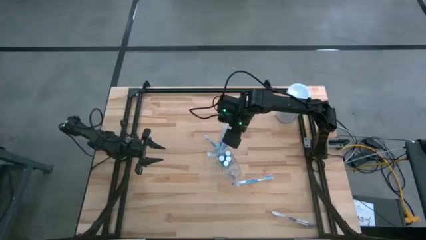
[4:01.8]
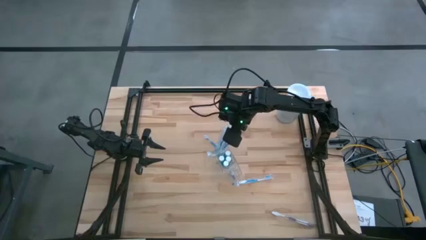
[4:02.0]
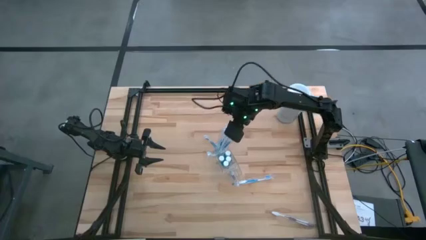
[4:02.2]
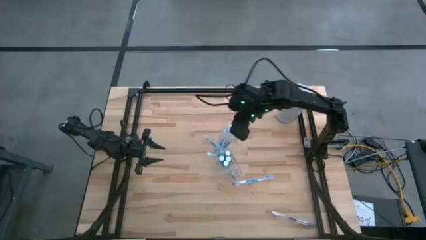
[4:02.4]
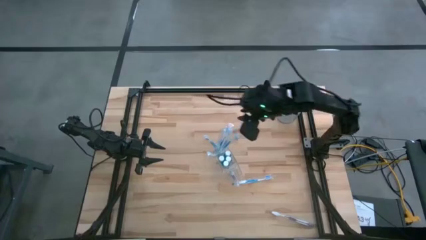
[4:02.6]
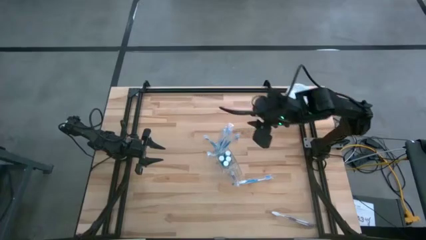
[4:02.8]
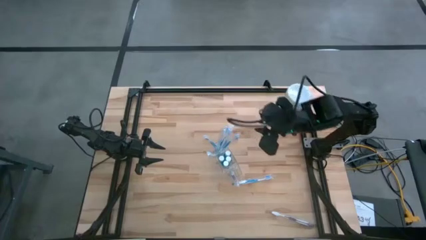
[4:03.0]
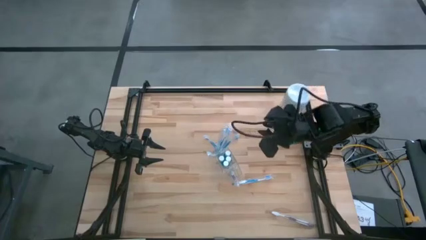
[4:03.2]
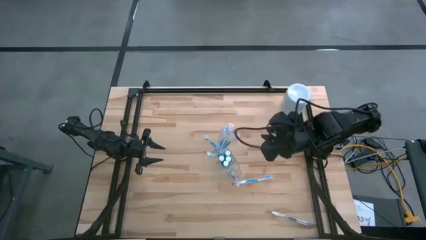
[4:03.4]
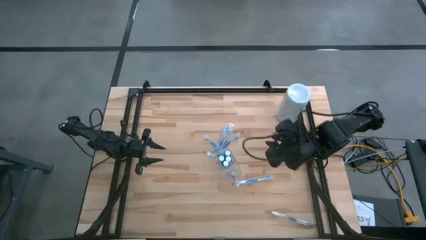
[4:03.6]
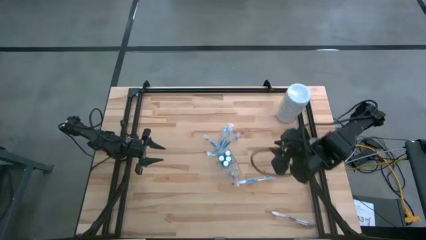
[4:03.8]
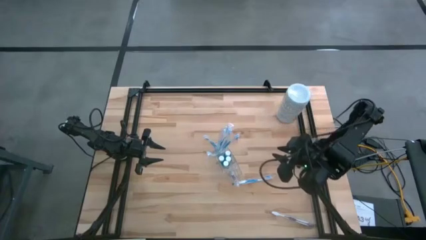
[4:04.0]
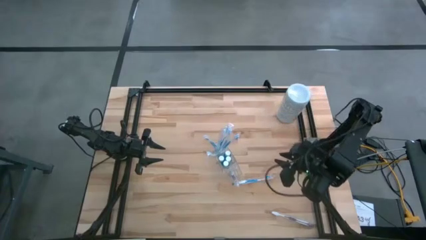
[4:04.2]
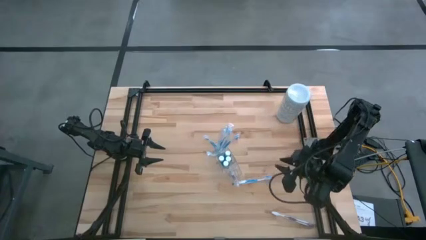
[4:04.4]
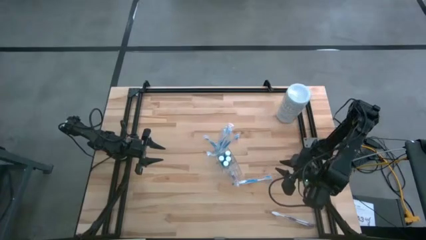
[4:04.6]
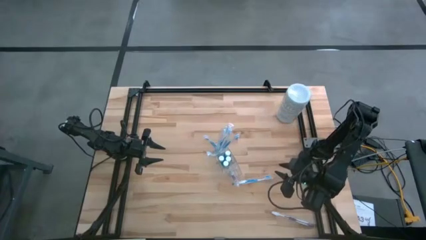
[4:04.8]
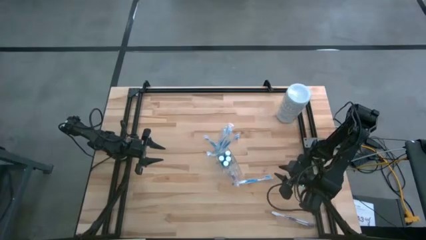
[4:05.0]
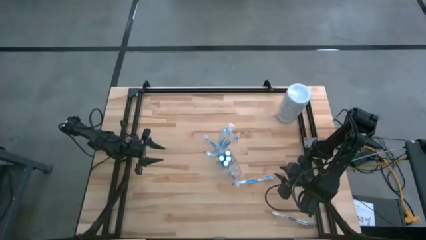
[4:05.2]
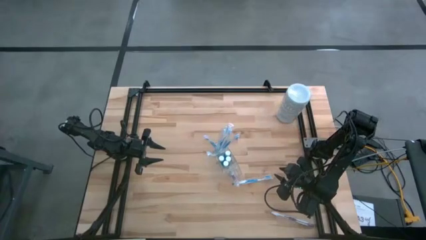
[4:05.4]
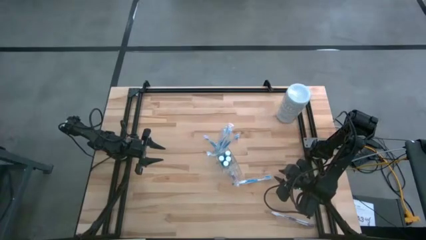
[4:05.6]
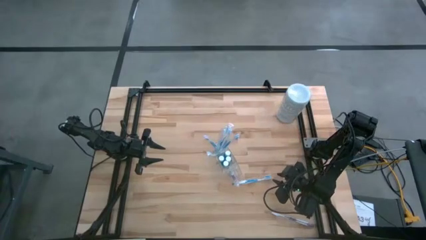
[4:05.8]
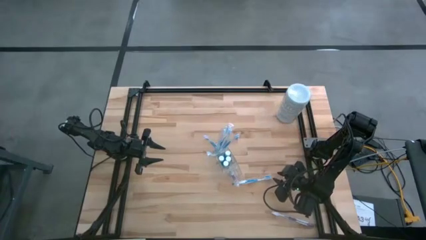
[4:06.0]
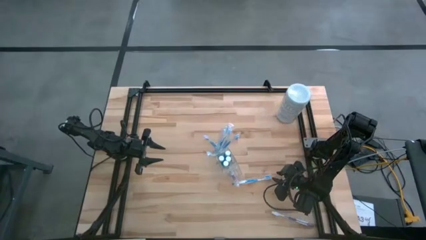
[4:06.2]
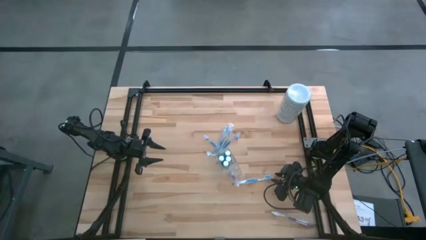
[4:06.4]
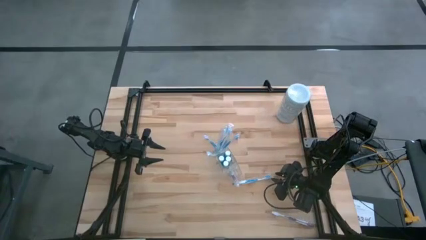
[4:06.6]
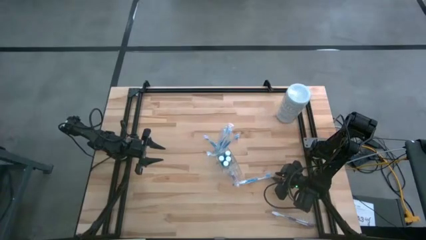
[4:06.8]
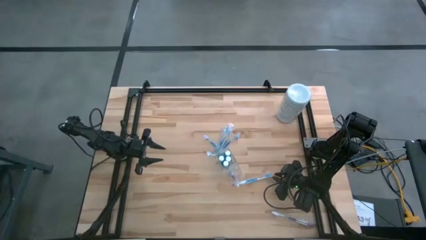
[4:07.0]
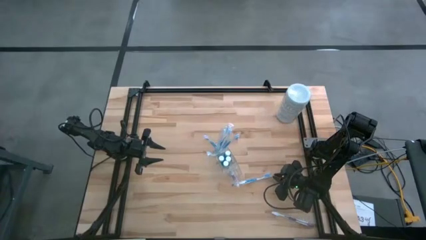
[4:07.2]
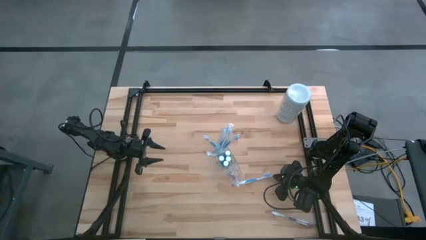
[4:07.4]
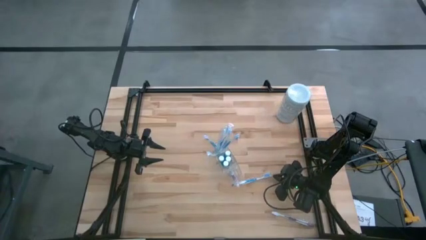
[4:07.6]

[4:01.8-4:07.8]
Task: Pick & Place toothbrushing station
Put the blue toothbrush into the left section of the transparent organizer

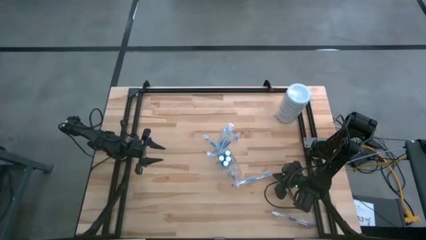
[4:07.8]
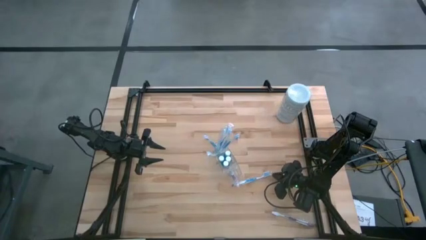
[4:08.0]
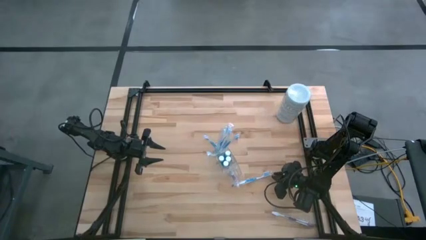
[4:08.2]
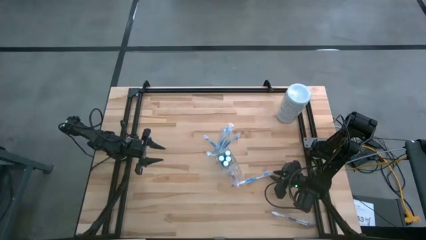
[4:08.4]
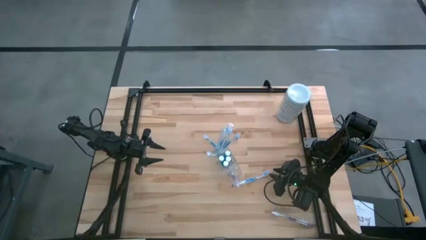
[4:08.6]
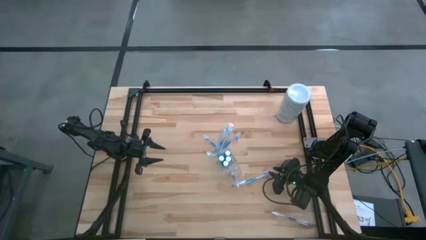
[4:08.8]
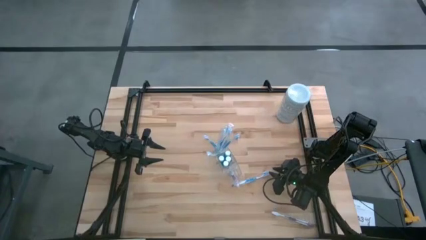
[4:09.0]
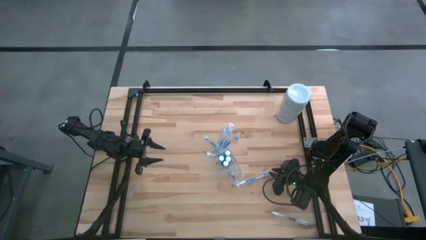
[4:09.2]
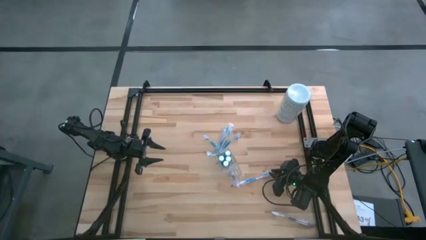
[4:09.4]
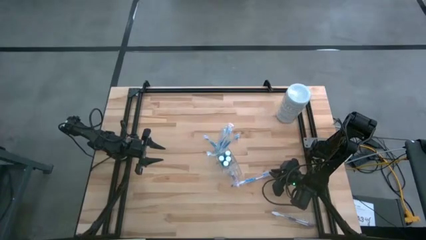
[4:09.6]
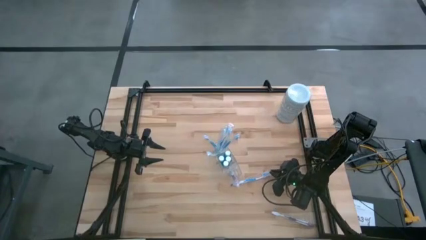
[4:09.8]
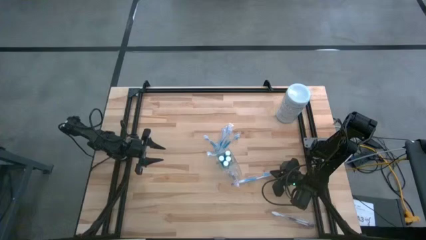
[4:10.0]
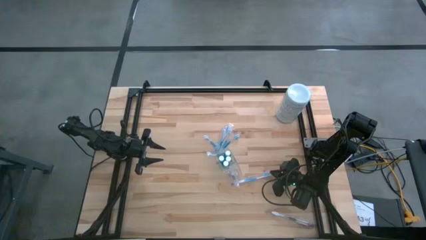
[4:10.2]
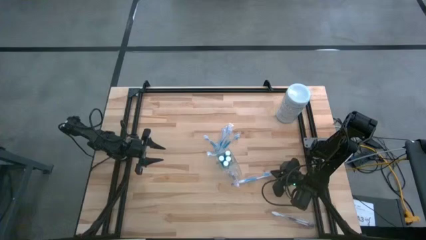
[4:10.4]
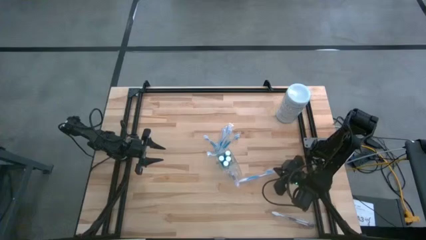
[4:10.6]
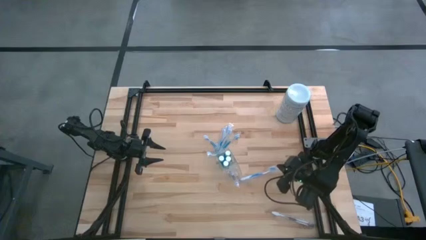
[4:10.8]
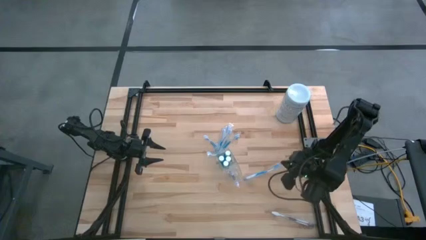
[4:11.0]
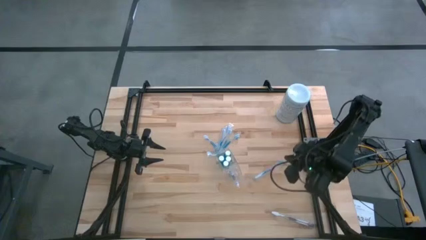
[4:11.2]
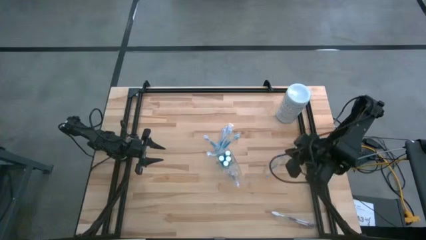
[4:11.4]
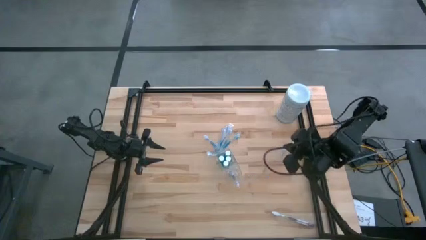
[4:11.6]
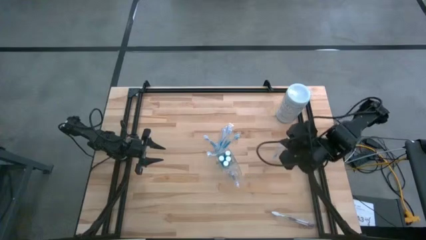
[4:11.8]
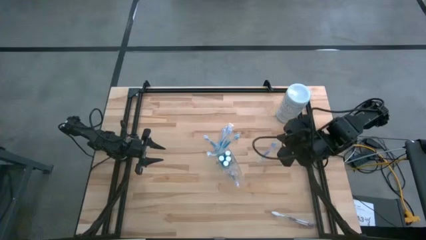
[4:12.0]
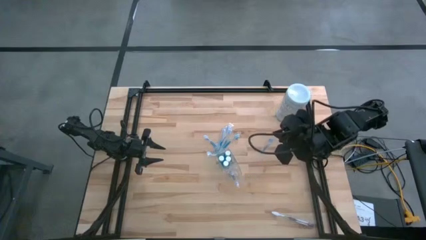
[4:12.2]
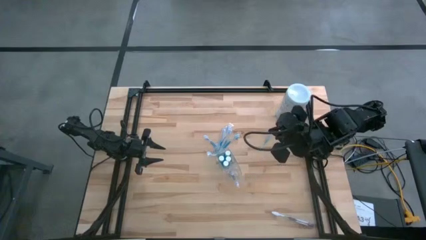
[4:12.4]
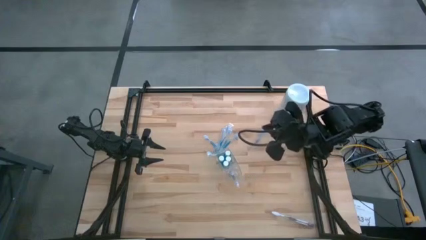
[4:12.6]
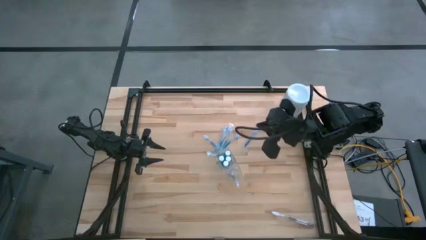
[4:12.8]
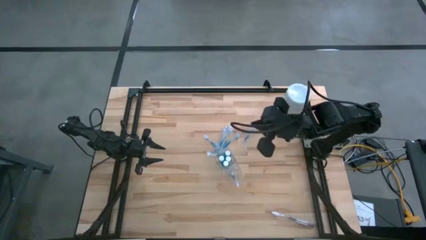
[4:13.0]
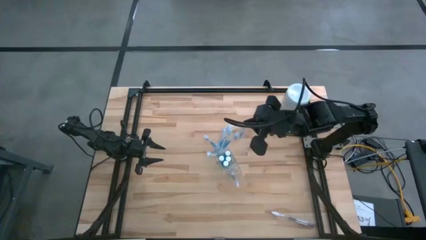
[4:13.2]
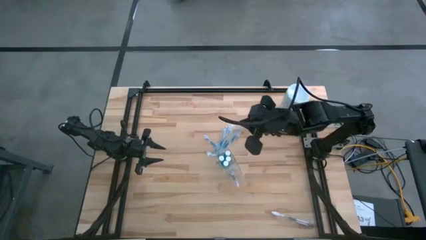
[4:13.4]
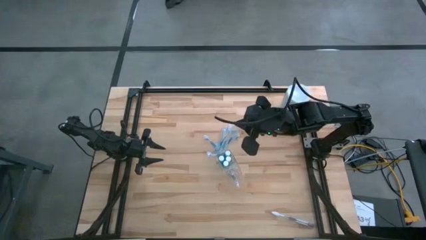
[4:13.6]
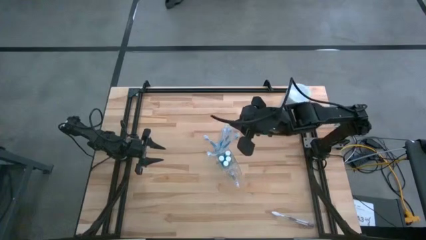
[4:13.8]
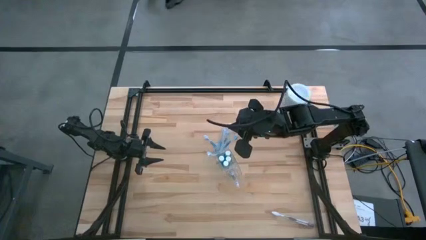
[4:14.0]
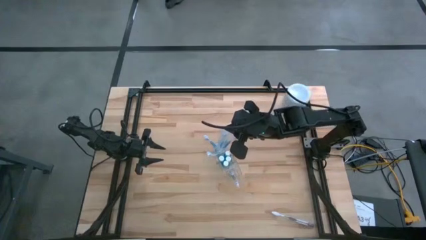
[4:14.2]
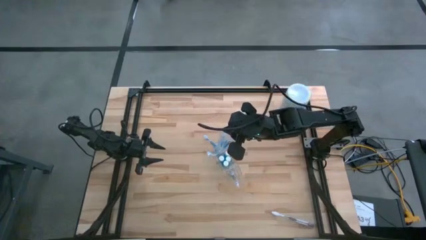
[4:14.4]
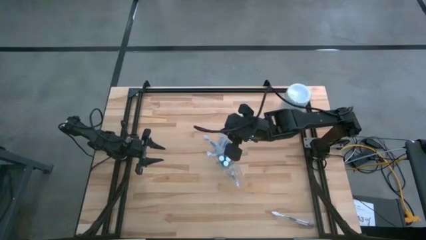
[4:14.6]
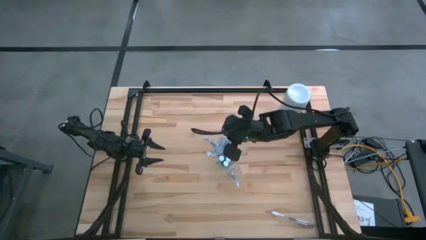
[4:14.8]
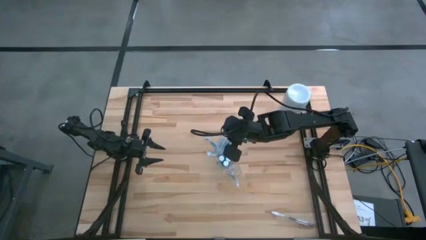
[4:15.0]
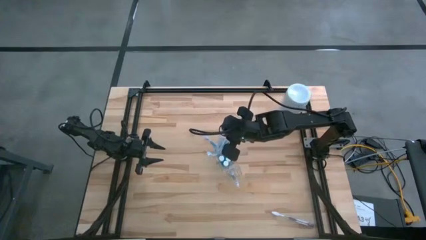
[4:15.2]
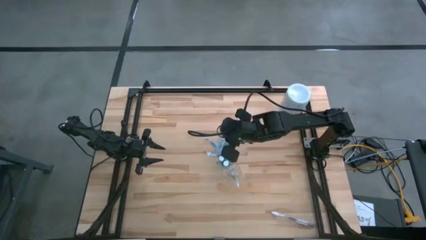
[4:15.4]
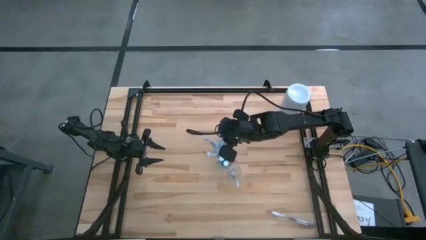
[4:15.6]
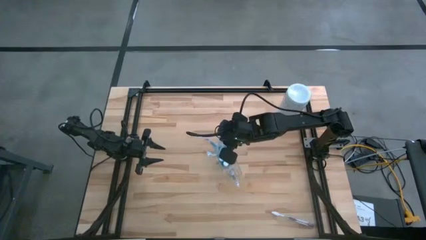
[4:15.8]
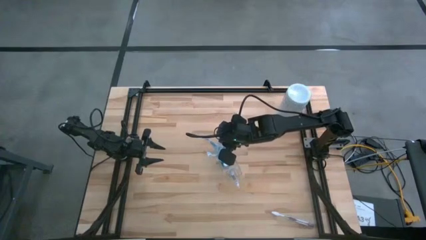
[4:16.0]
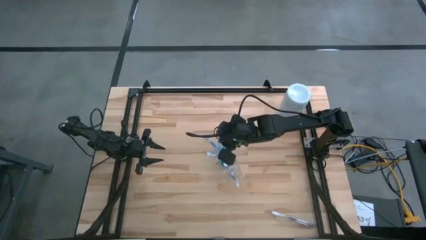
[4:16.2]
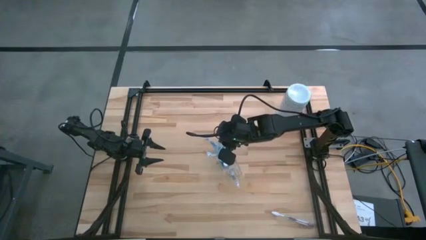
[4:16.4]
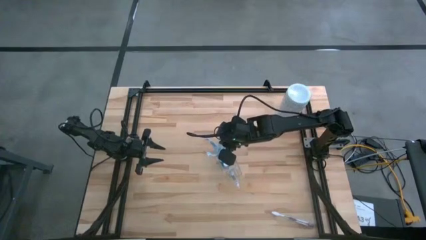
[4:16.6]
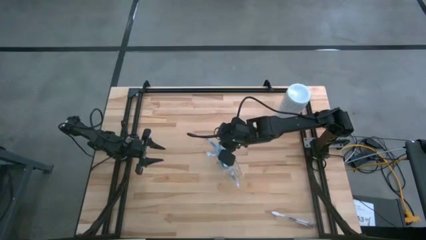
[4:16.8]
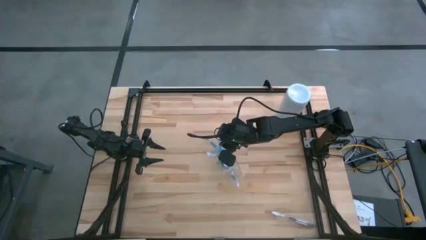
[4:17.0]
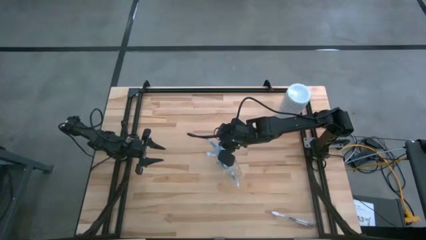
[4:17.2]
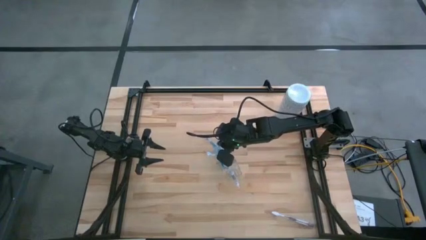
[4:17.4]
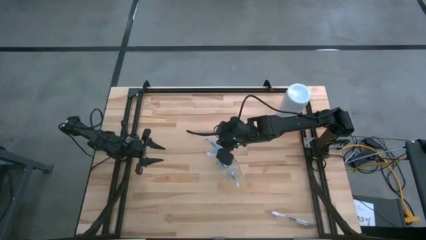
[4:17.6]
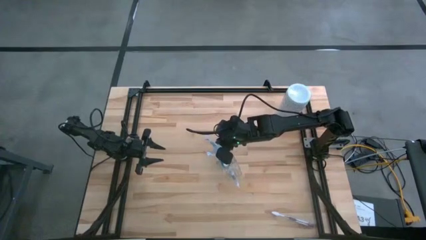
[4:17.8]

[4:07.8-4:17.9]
Put the blue toothbrush into the left section of the transparent organizer
